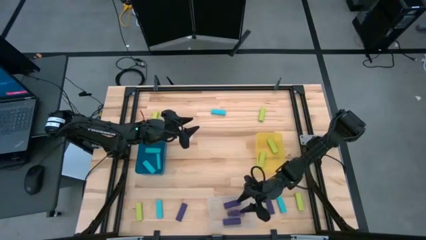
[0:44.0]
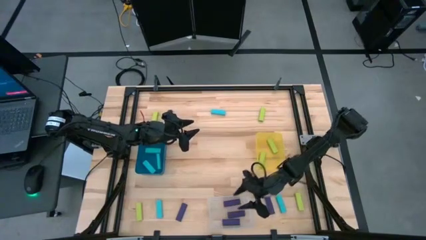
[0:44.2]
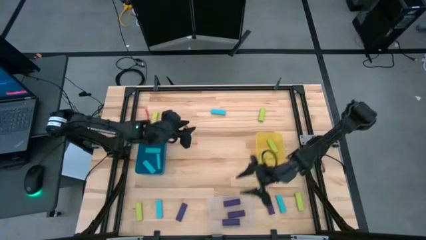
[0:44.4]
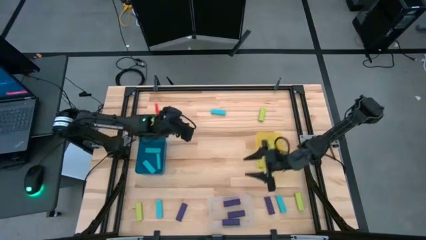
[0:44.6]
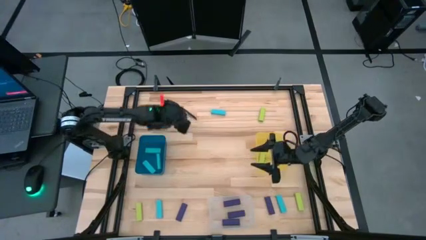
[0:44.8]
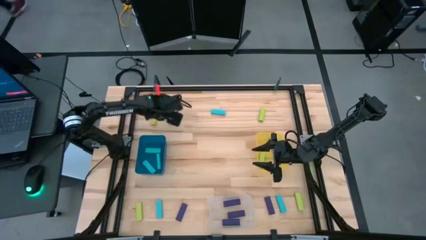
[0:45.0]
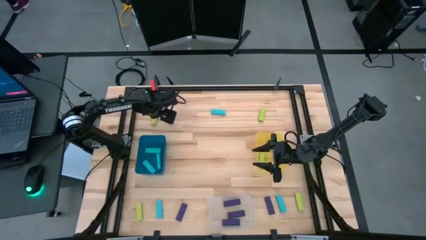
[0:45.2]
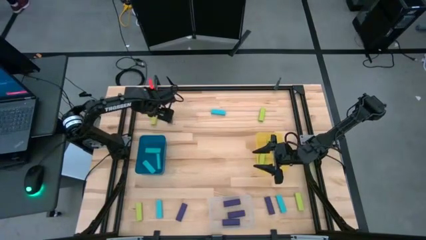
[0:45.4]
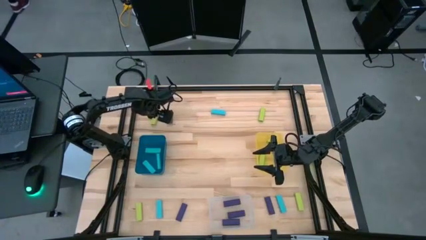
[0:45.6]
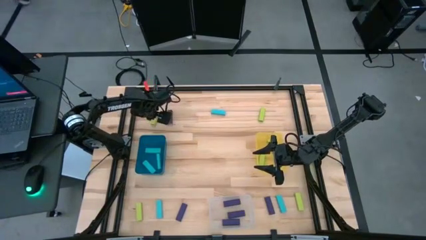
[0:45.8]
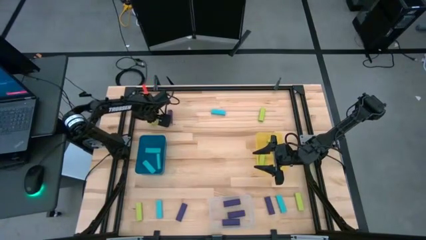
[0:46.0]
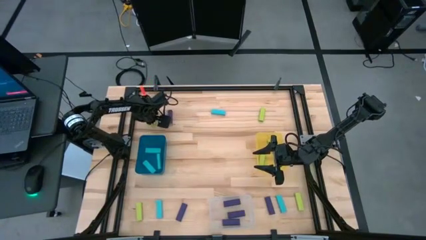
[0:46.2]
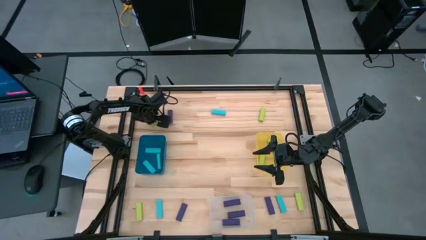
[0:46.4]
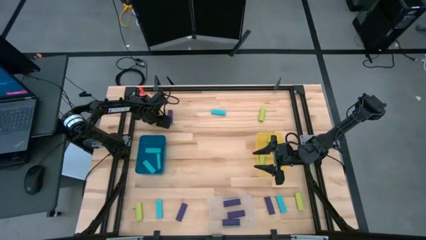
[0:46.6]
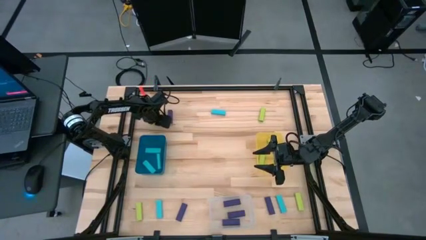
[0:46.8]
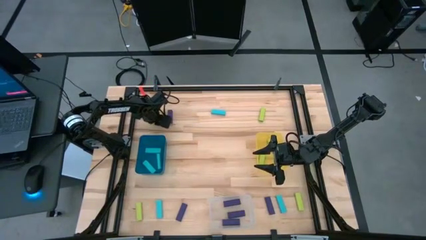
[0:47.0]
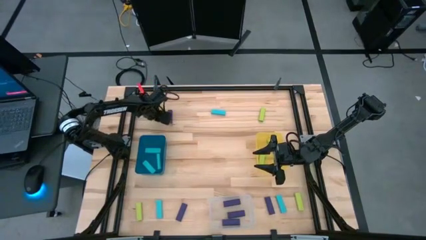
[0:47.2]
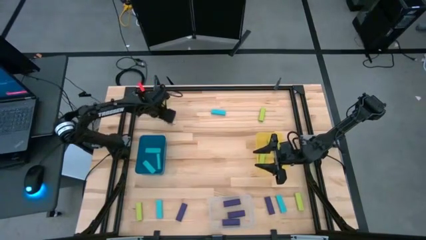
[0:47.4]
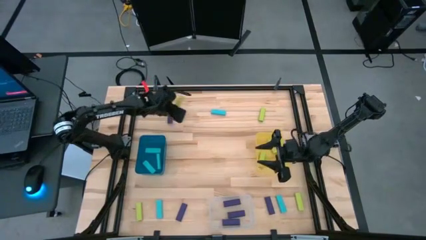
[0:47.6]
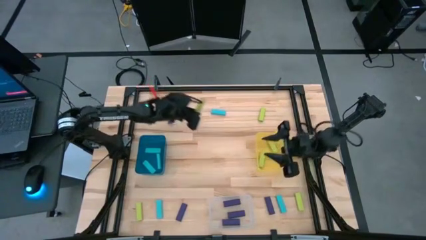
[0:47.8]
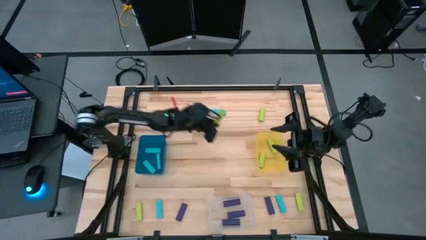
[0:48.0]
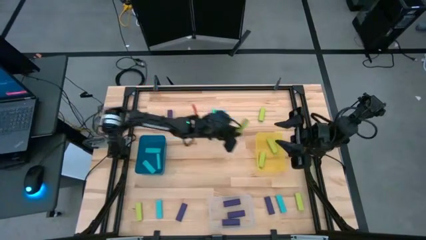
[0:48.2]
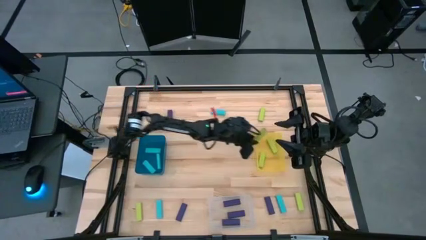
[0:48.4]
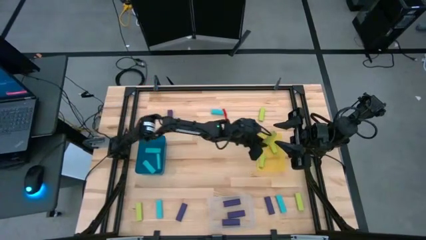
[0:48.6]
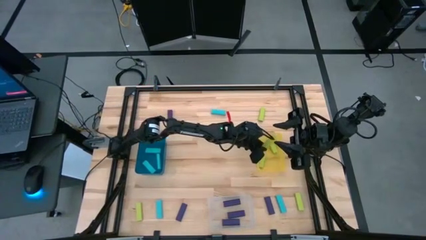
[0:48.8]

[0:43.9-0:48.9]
Task: Sort blocks
Put the green block into the yellow bin

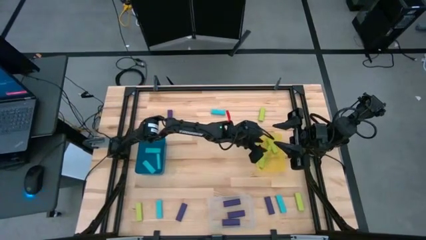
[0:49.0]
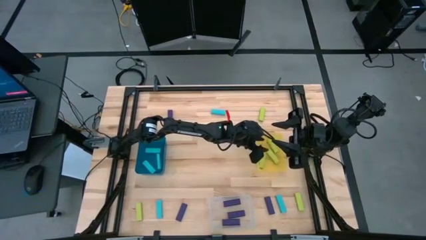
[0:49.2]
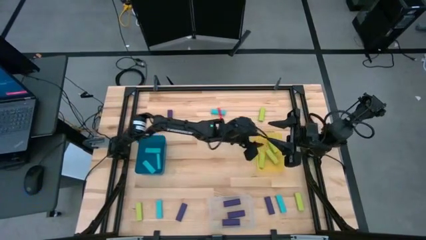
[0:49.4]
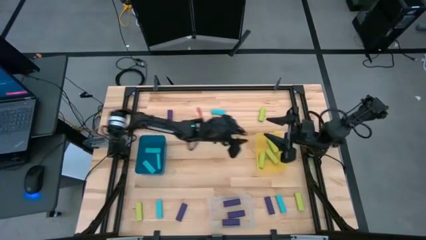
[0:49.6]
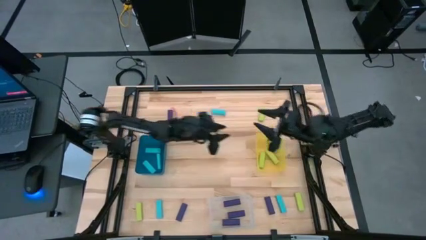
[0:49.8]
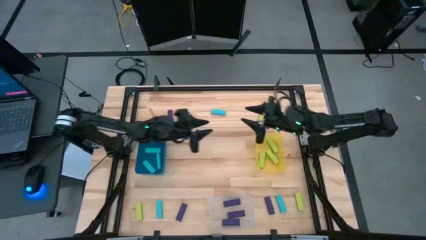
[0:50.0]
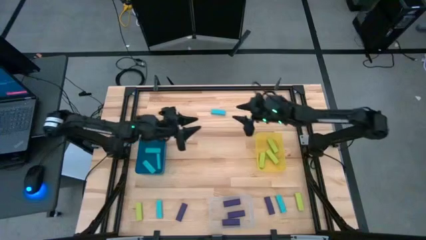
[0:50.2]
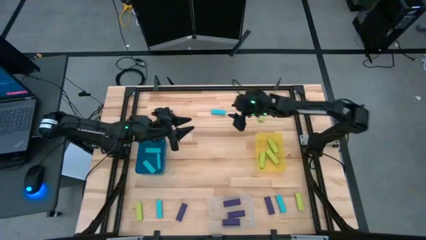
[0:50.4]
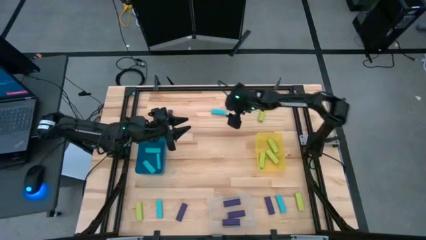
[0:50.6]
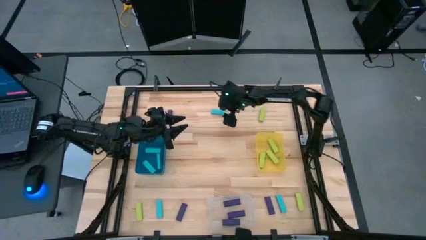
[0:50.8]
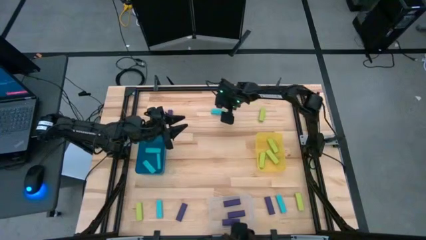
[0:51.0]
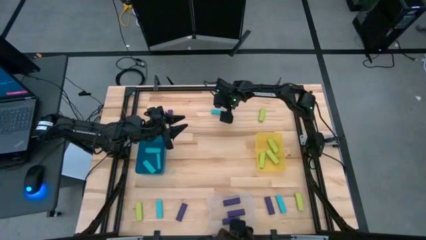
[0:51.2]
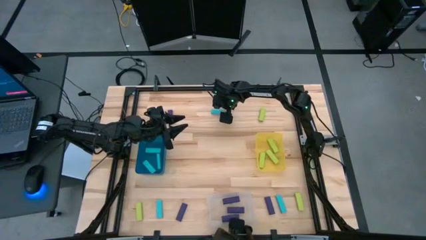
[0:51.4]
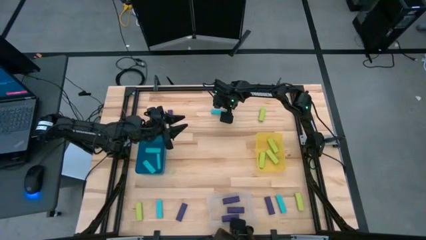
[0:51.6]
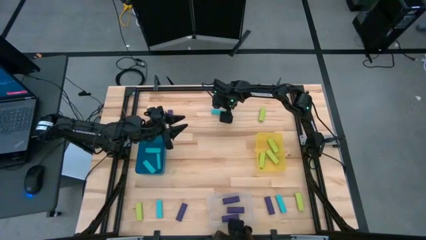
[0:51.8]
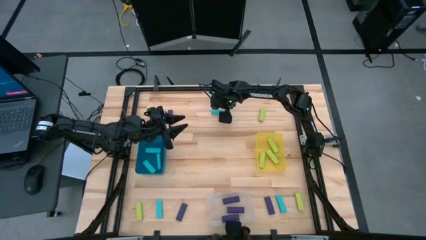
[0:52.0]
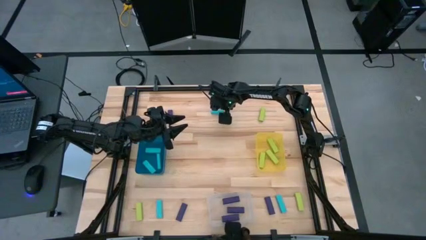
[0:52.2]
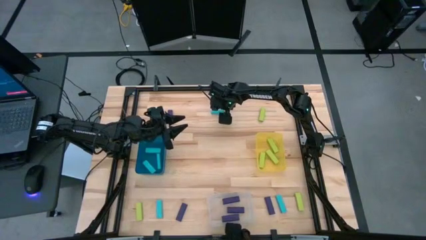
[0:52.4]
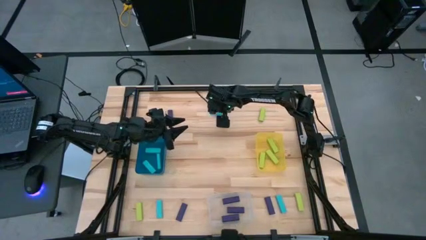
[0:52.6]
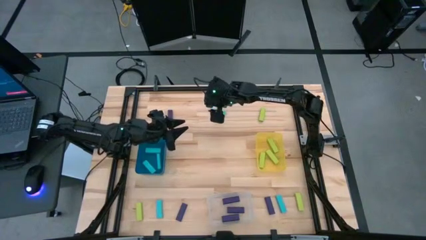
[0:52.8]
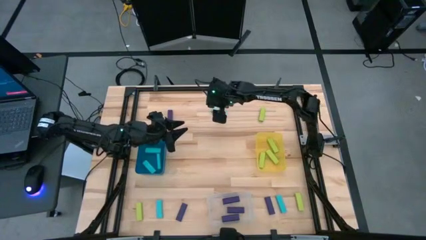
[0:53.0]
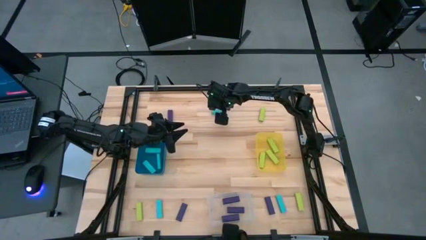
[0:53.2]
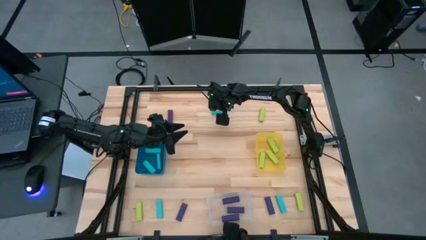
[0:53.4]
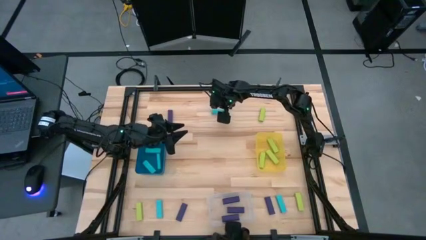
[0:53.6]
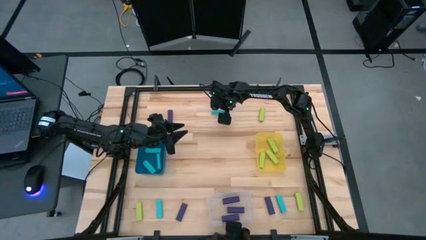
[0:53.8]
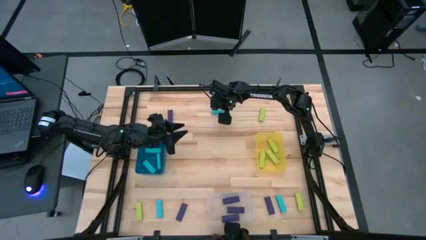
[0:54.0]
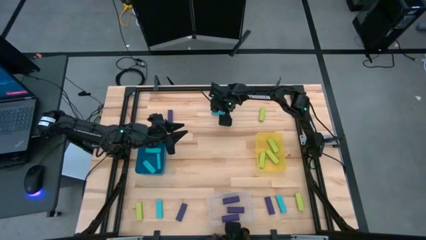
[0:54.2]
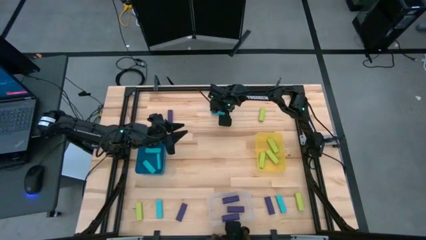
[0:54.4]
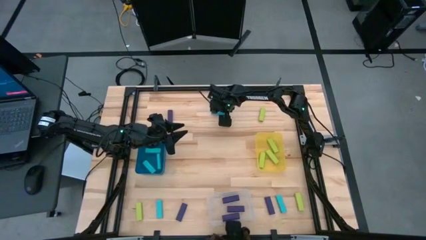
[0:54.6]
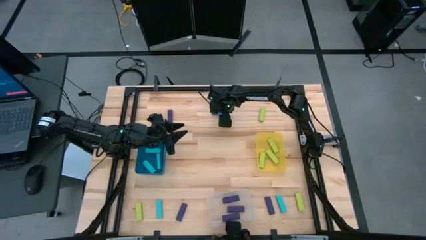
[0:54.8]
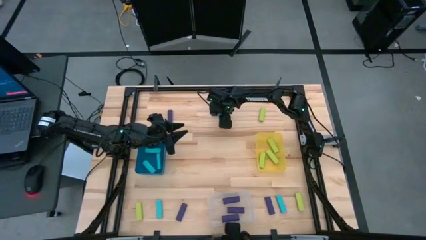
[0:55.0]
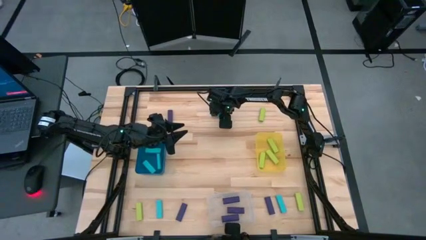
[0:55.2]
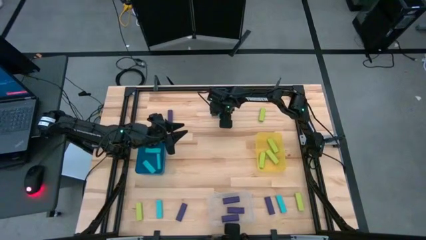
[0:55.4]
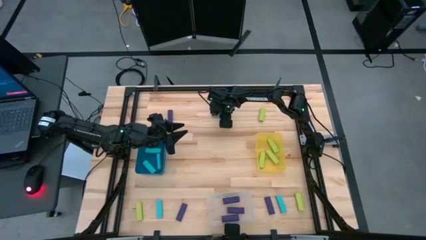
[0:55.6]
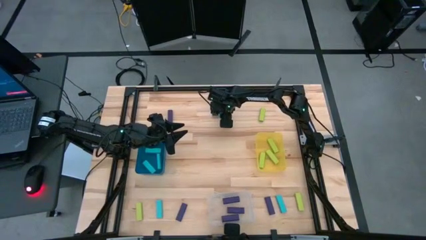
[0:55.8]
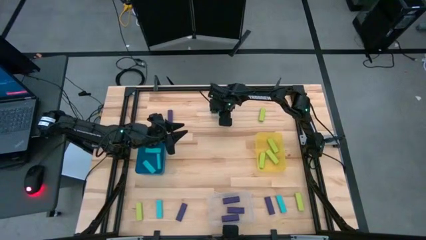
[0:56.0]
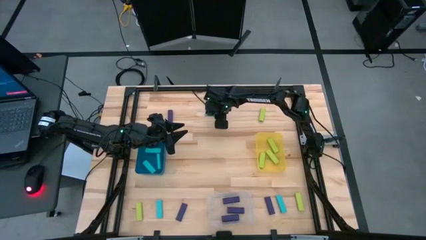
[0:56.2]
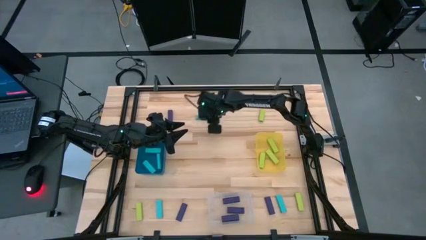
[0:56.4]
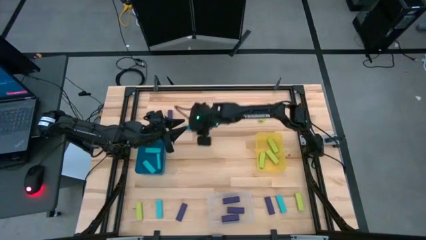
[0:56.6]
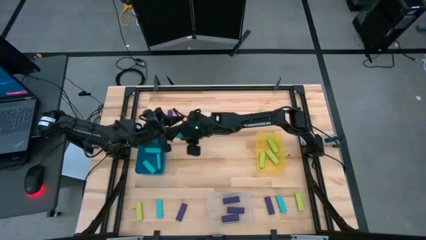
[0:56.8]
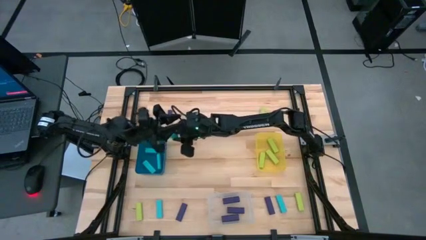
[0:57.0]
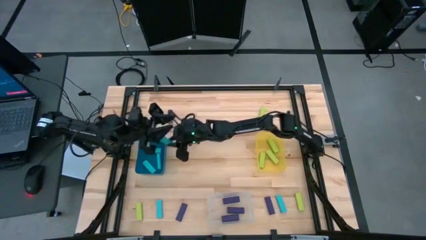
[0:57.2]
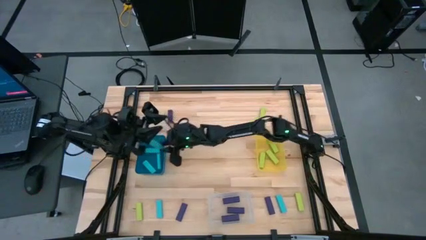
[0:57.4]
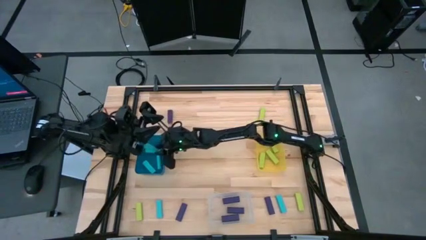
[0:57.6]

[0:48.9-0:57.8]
Put the light blue block into the blue bin

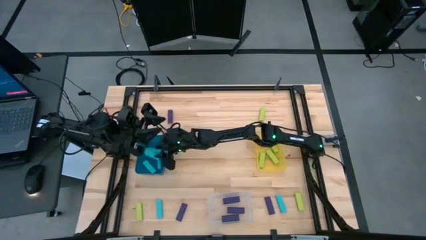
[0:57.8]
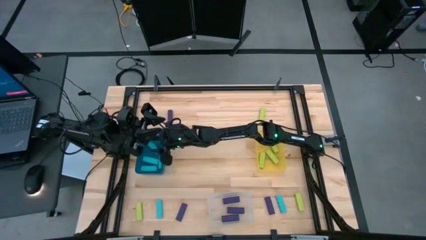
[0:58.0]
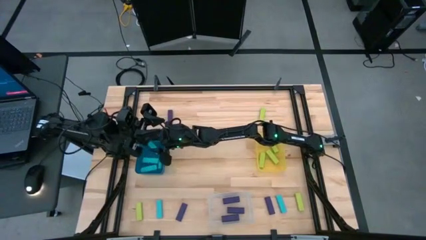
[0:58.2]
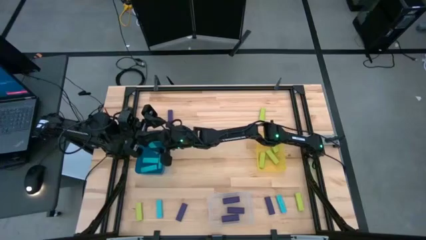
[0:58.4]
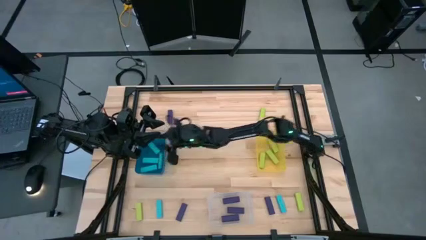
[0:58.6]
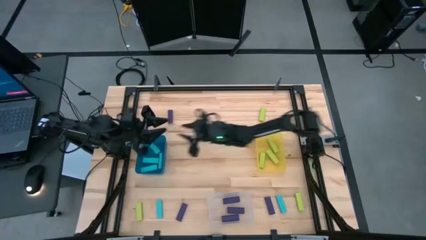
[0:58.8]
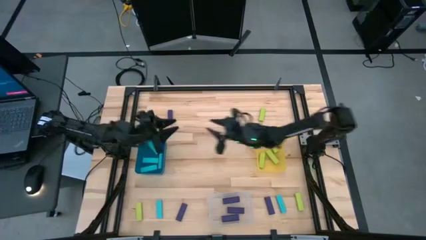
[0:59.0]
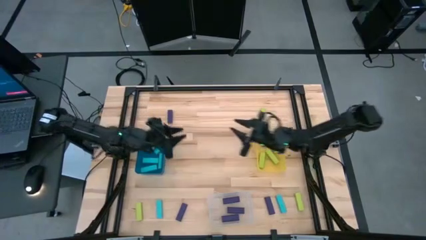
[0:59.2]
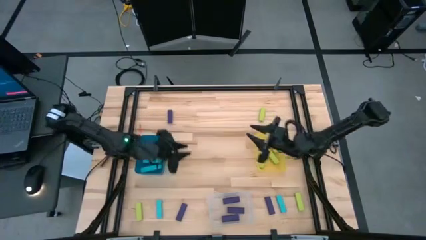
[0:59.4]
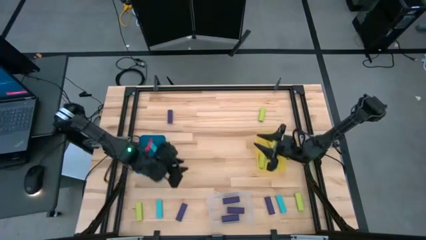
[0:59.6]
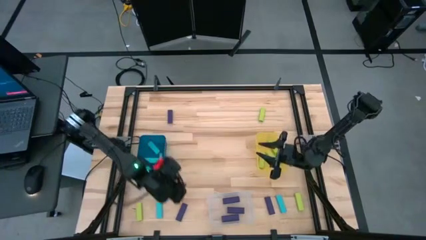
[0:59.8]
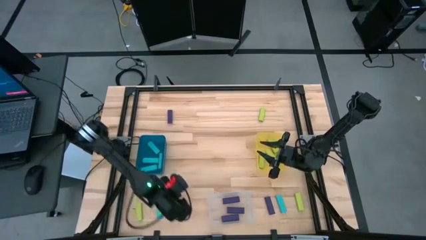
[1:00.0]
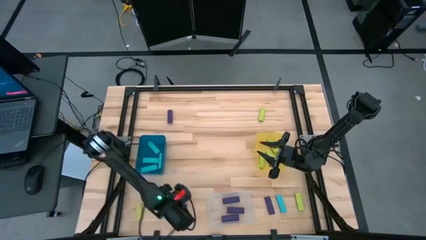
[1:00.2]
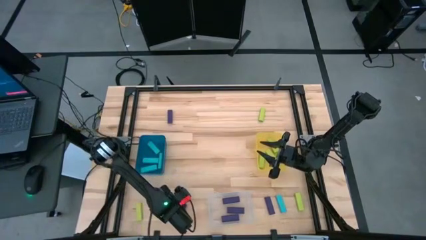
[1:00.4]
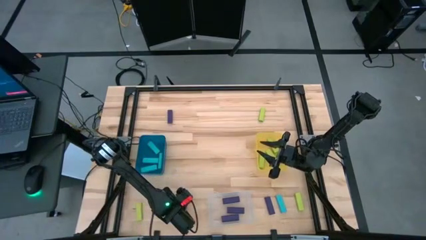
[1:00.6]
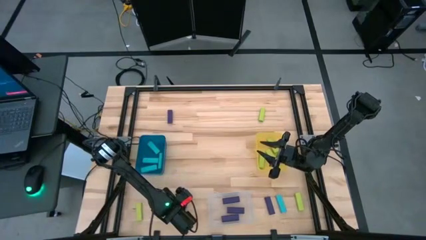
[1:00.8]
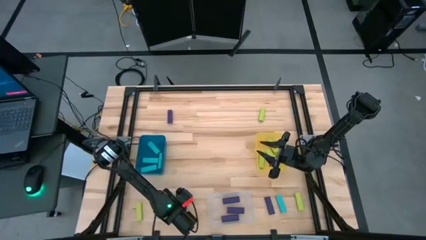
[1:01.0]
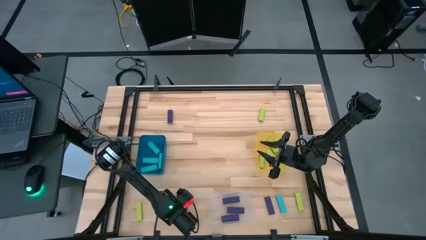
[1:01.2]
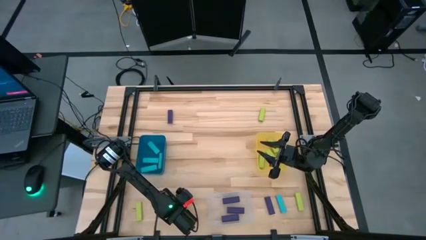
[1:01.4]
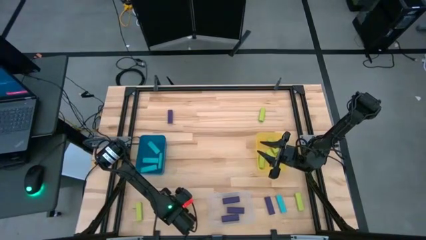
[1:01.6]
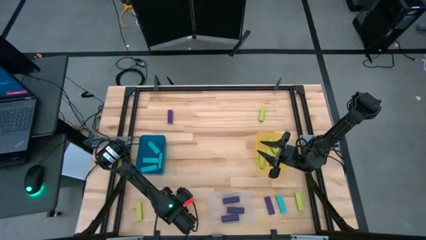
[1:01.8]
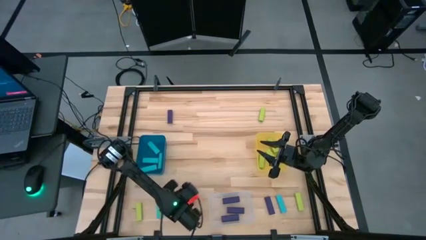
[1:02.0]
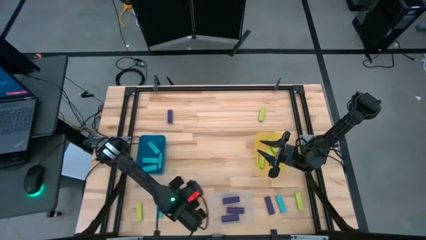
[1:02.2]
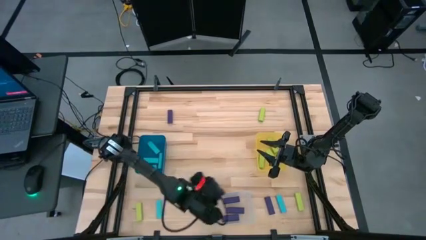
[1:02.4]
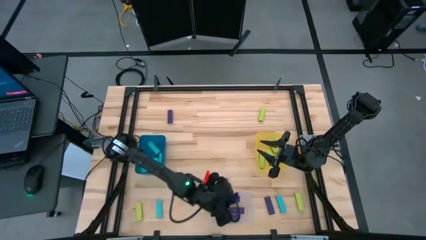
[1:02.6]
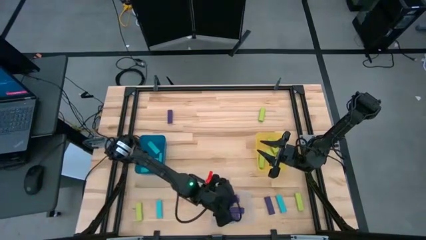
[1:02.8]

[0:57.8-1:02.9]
Put the violet block into the transparent bin
